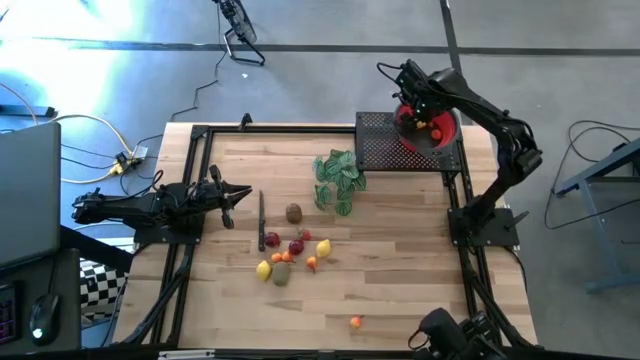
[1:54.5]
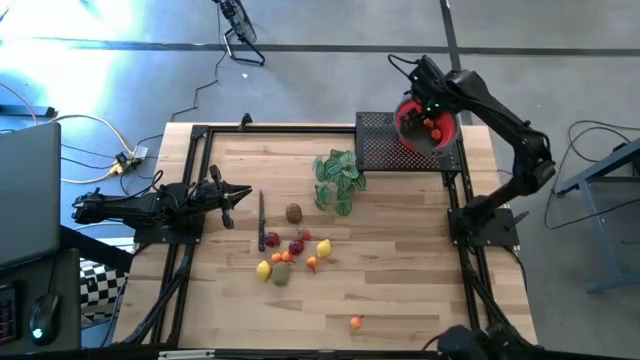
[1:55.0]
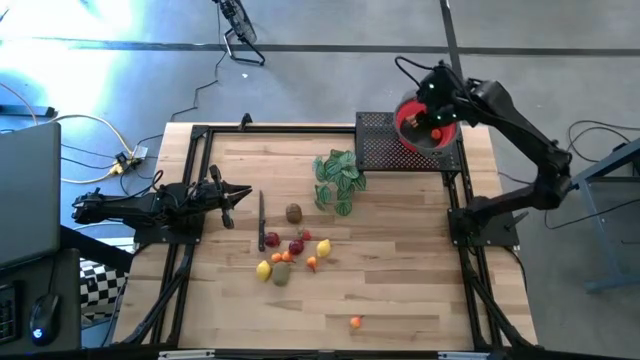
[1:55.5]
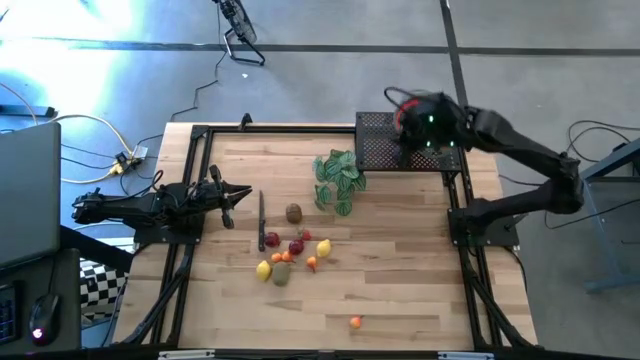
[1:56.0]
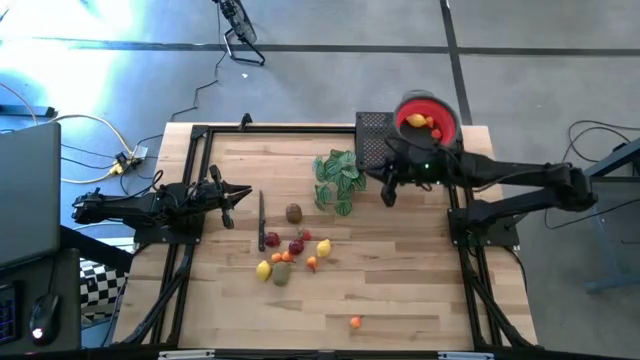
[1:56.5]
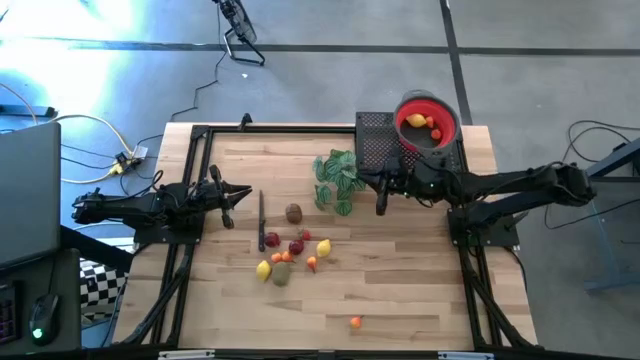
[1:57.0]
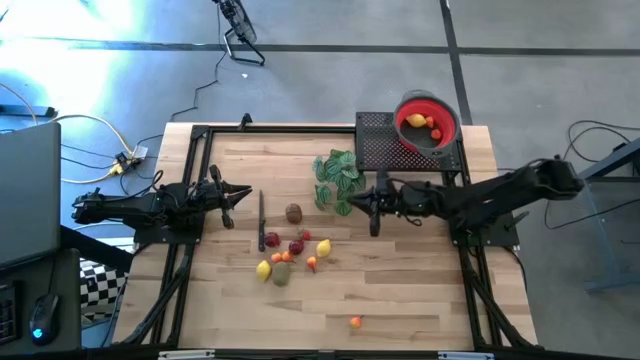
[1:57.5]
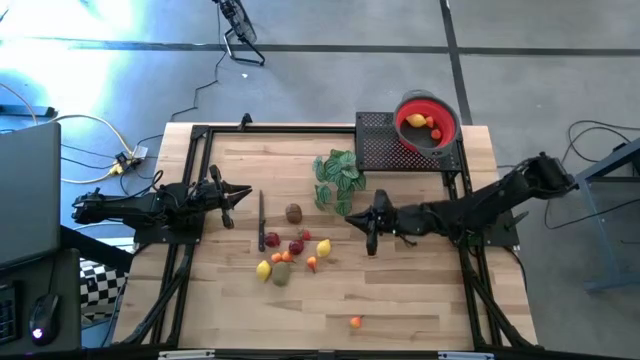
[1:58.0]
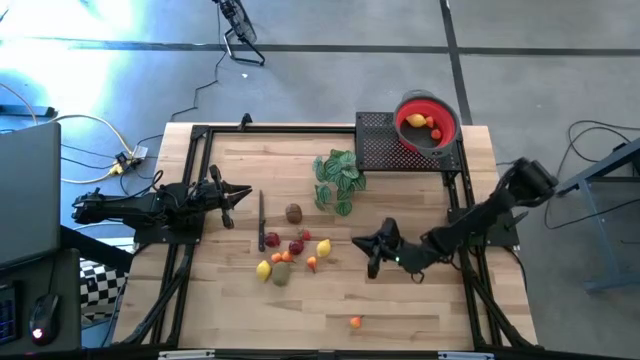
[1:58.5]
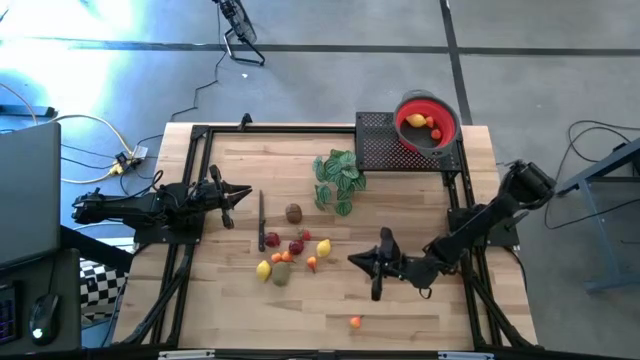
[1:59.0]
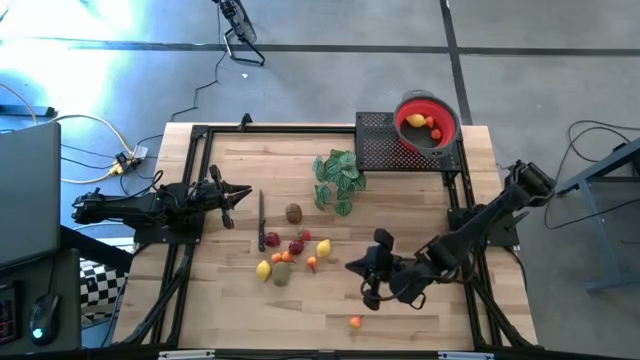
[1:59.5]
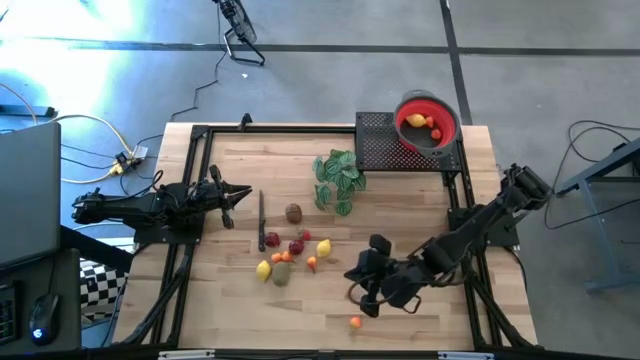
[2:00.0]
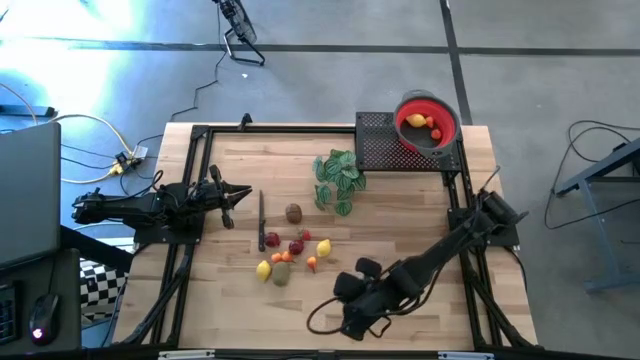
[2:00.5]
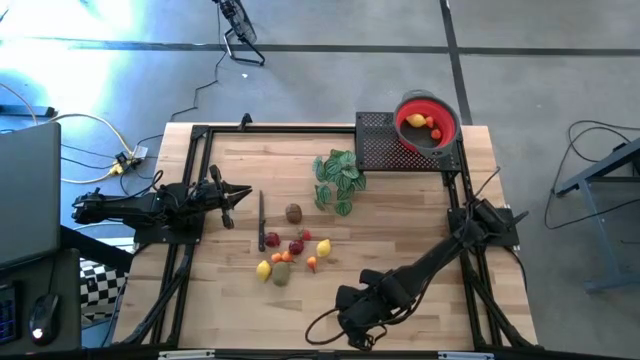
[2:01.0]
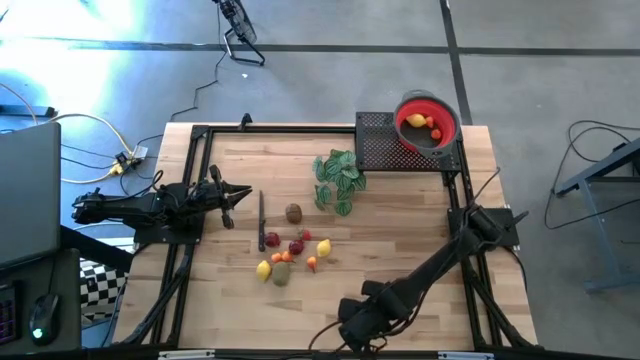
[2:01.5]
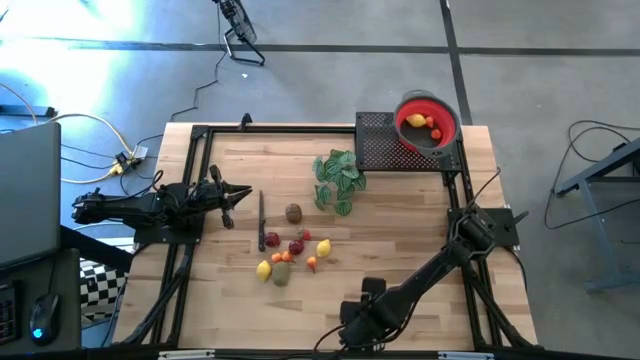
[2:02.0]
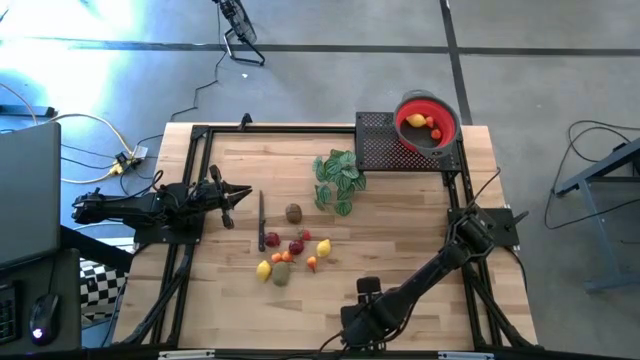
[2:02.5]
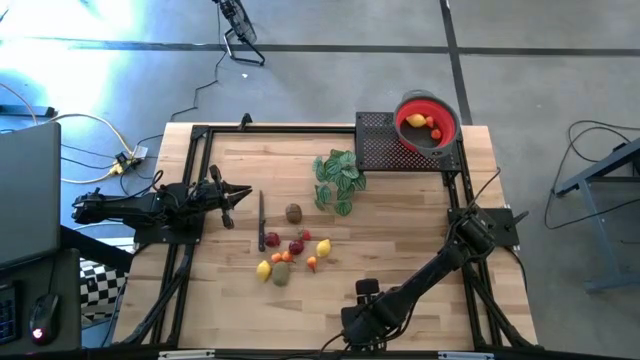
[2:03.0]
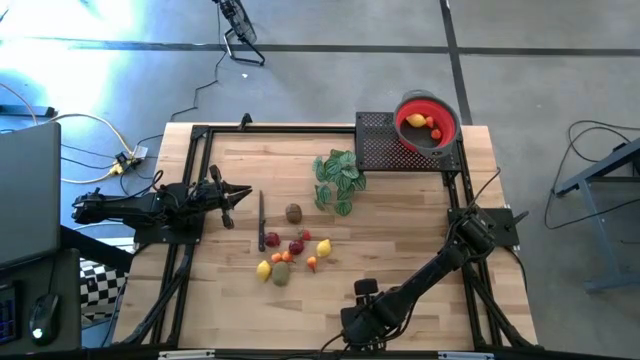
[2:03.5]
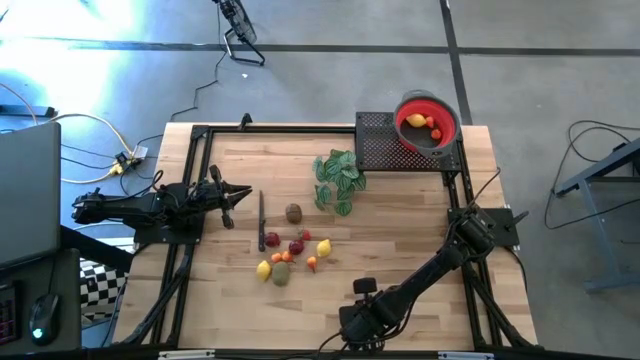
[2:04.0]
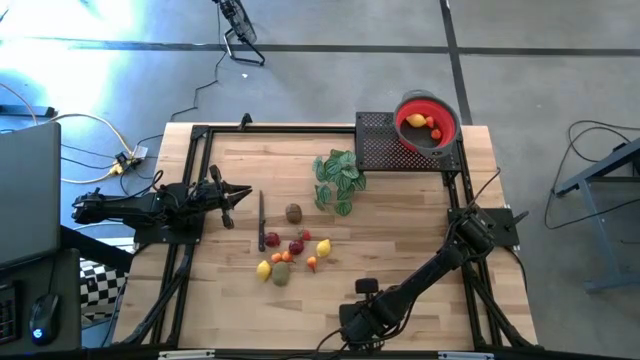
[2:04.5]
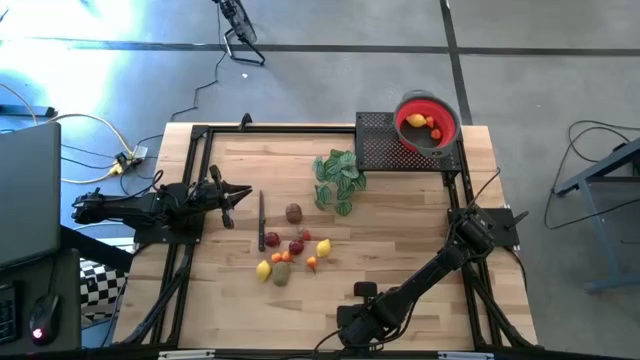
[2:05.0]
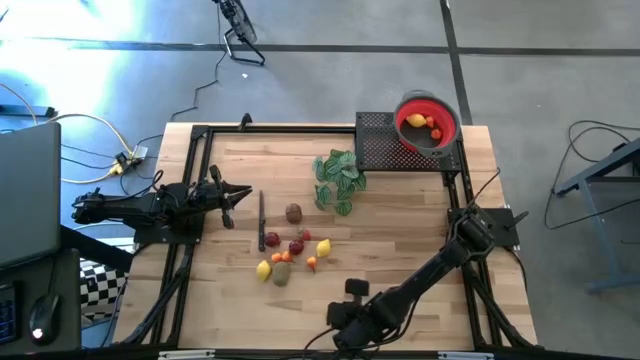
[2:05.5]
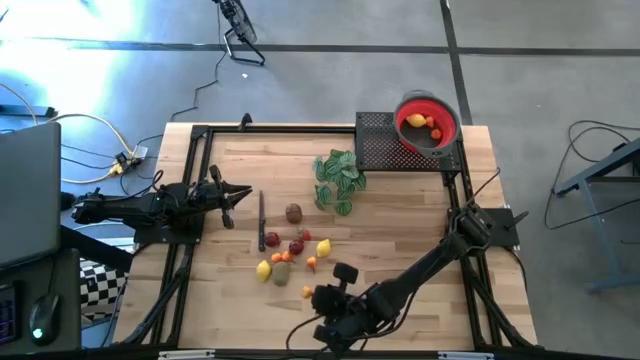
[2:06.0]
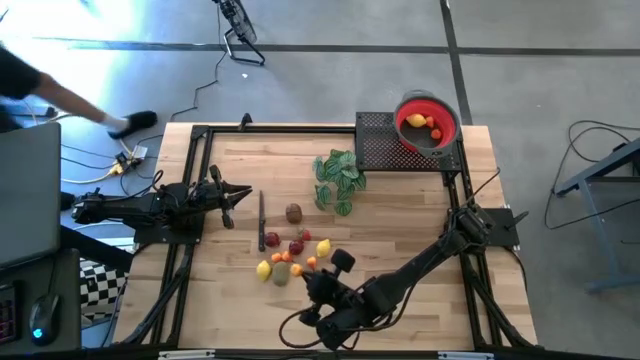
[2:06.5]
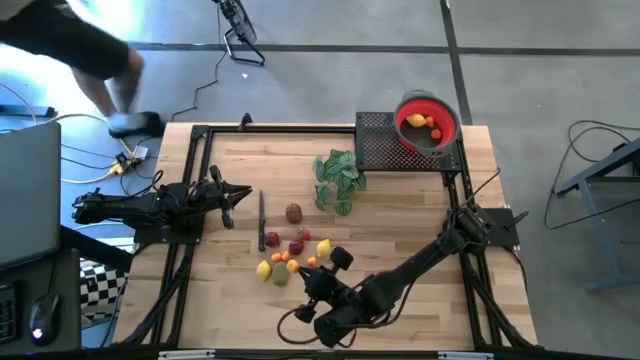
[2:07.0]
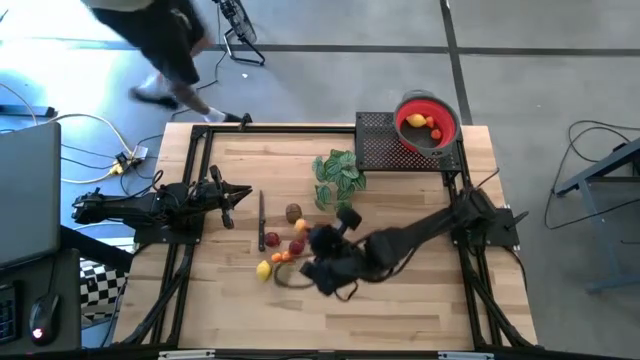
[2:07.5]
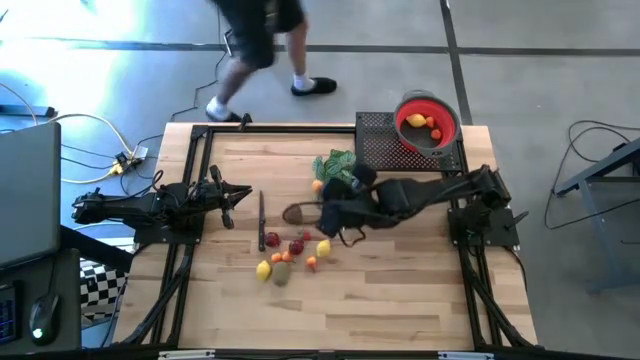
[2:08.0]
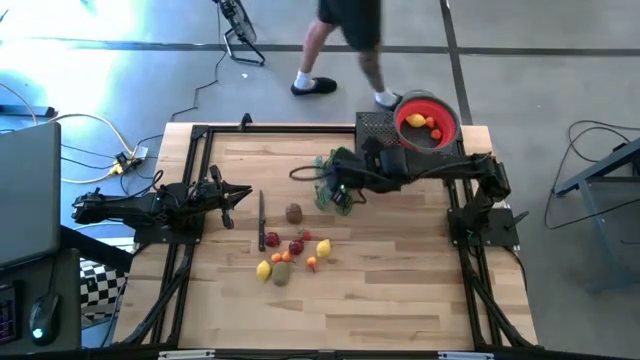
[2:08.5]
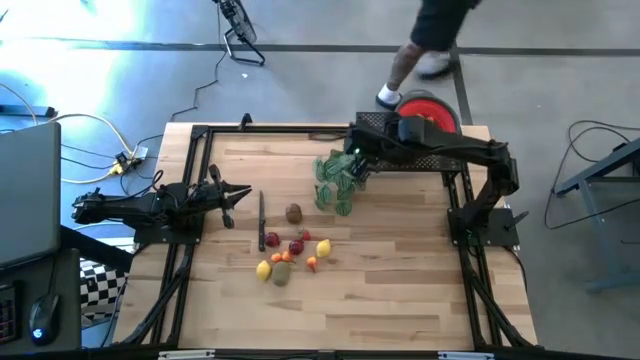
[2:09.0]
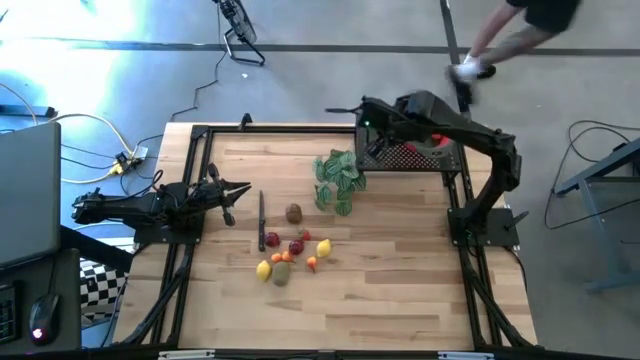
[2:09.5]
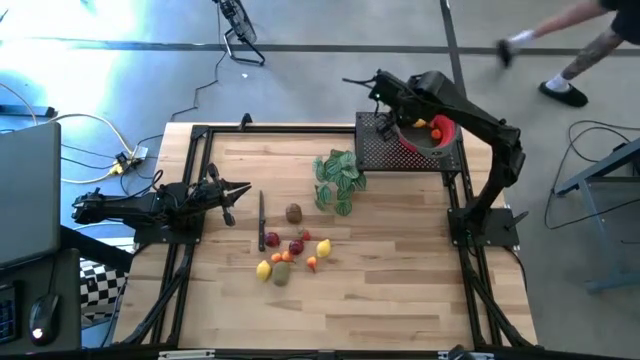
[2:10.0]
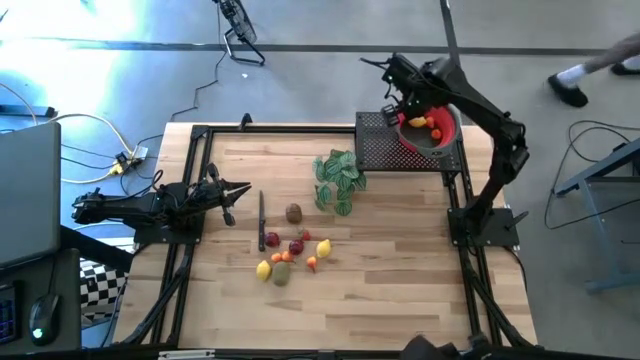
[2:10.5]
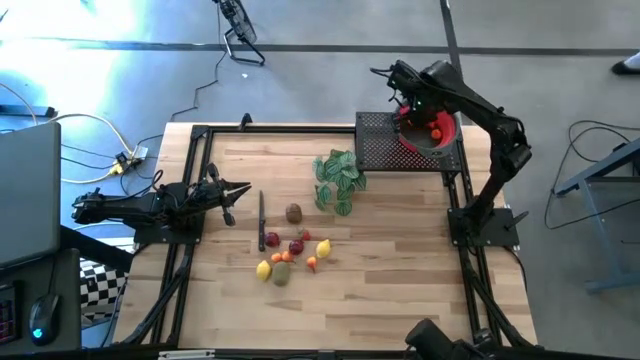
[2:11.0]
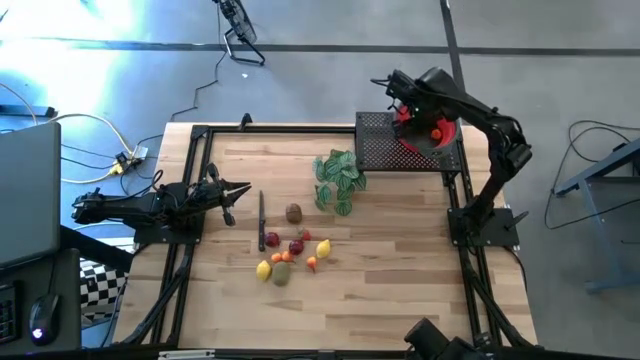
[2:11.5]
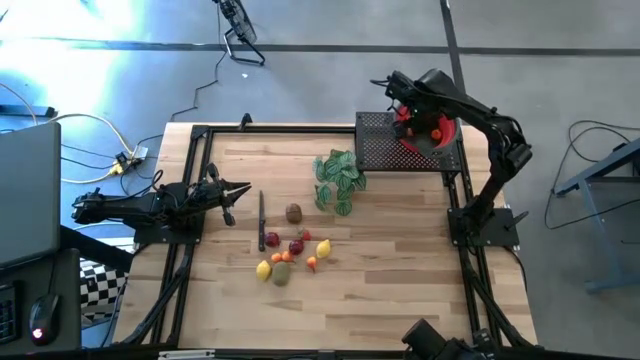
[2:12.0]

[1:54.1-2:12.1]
Task: Pick & Place Fruit
Put the orange pear into the red colander

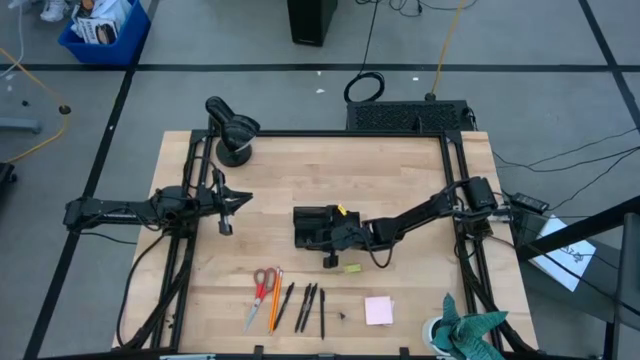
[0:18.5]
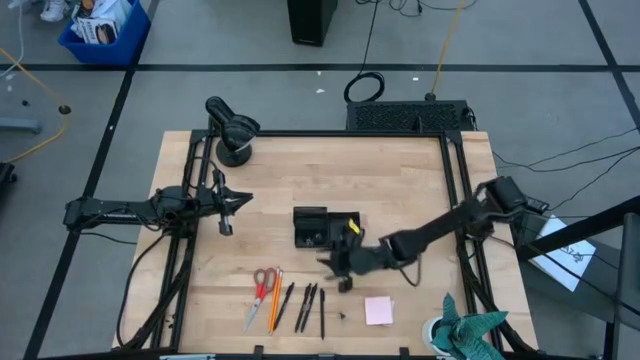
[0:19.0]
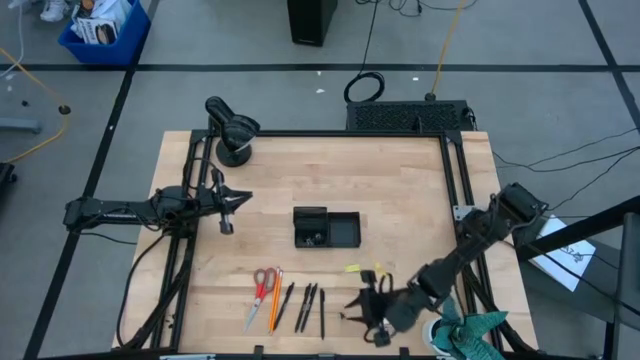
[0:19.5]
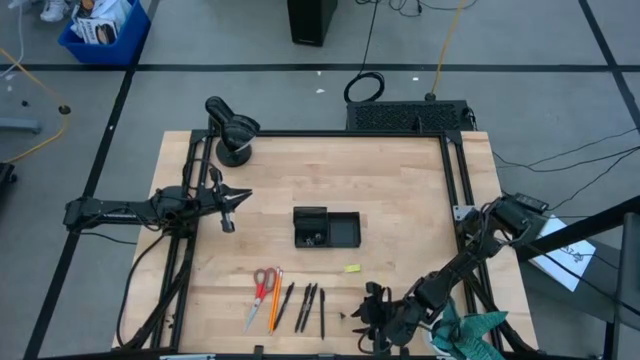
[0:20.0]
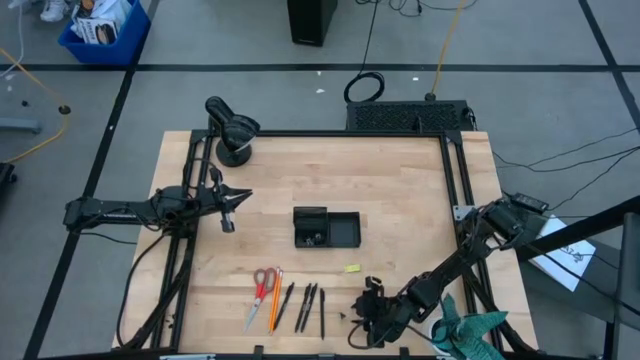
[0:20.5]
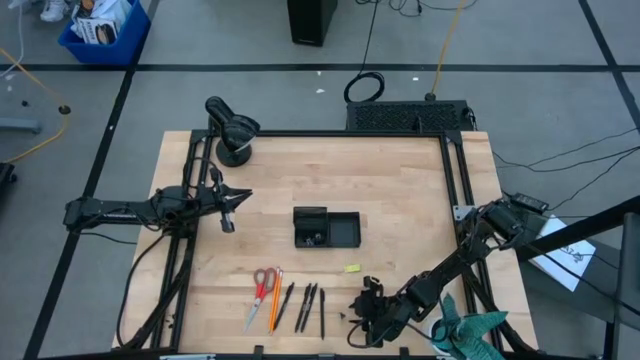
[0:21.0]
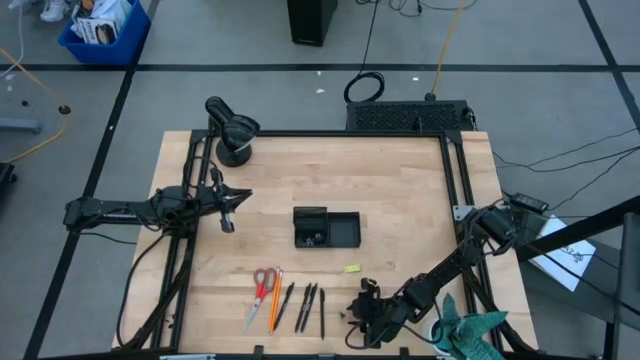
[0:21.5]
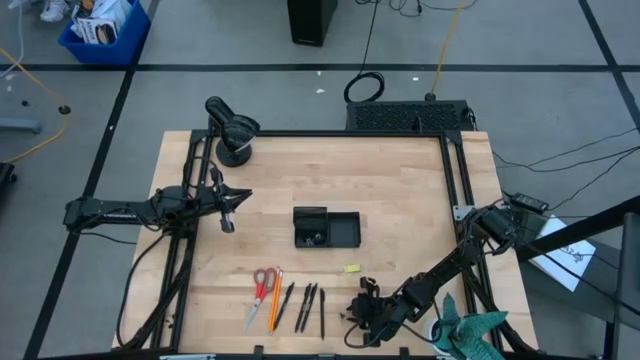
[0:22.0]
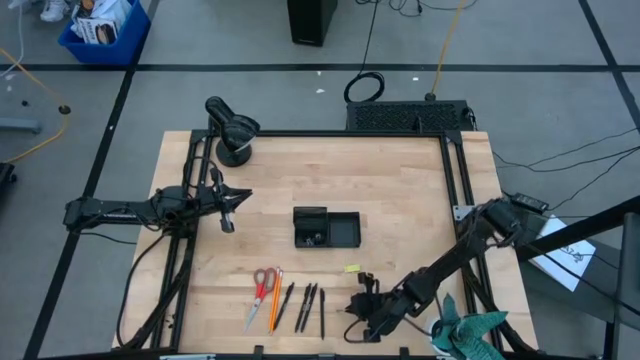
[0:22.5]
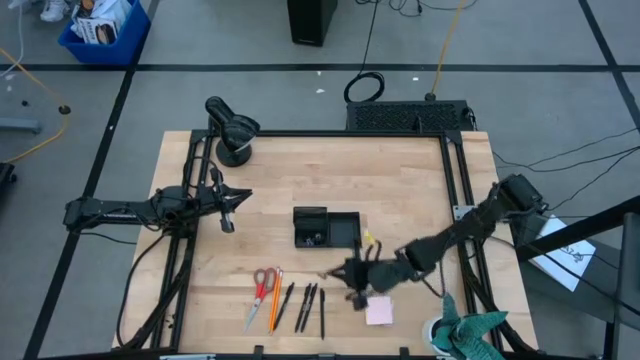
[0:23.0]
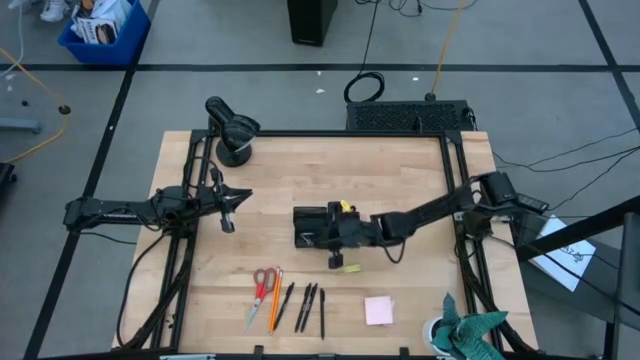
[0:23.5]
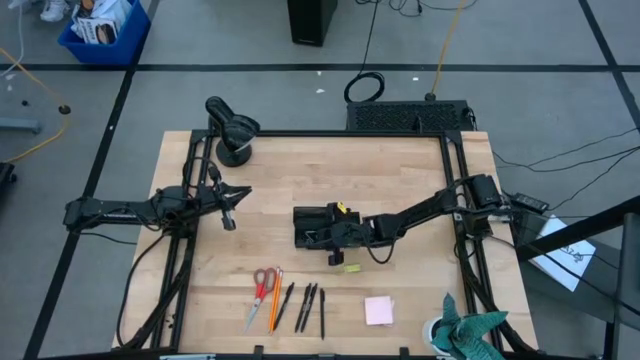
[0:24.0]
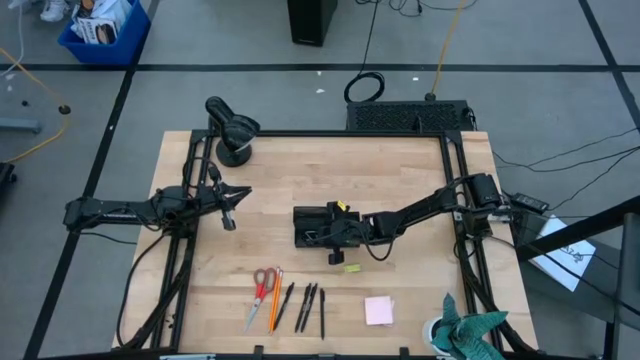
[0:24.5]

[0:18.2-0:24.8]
Task: Pick and place office supplies into organizer
Put the binder clip into the black desk organizer
